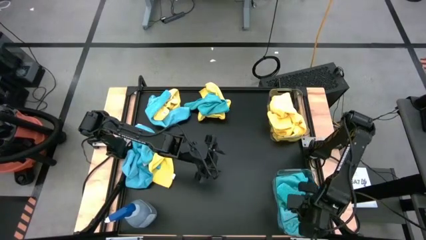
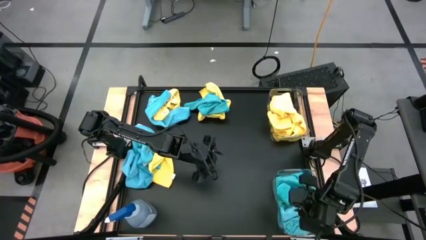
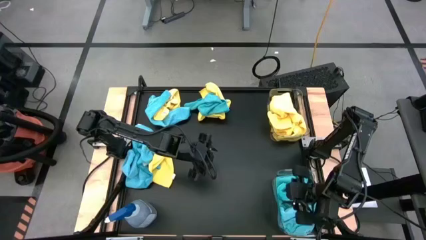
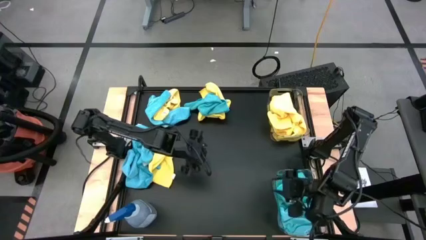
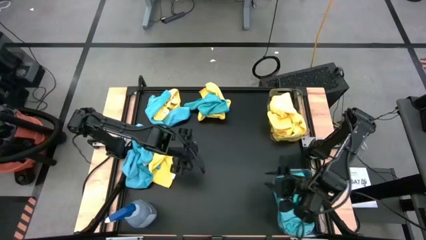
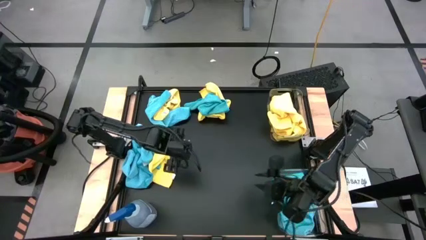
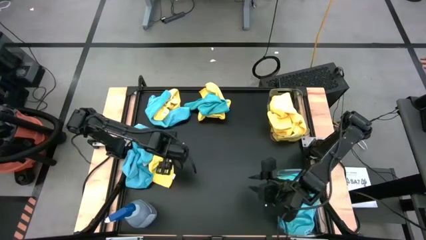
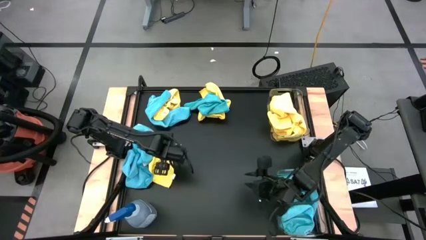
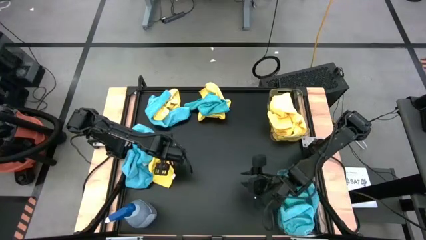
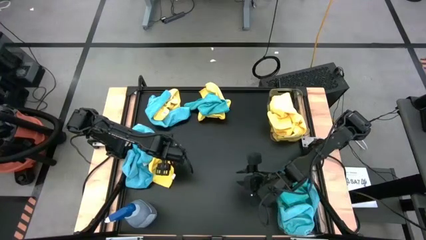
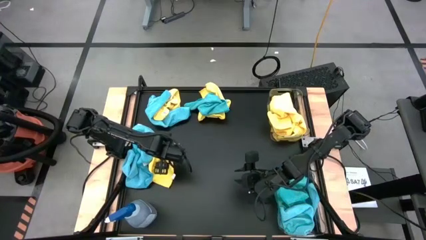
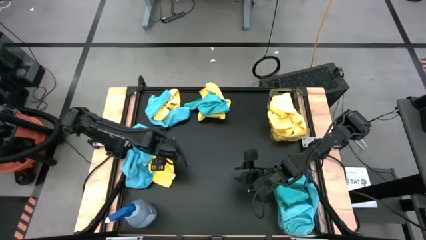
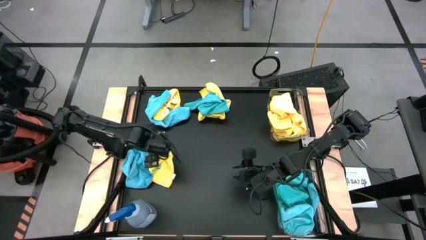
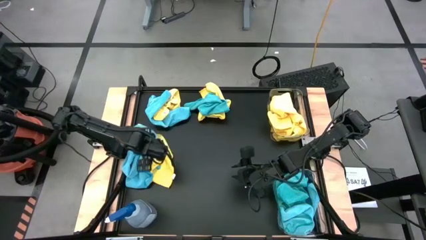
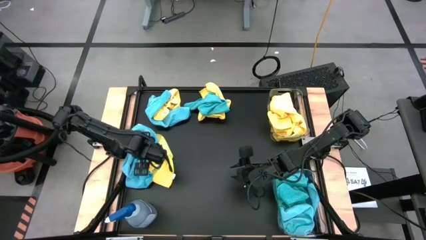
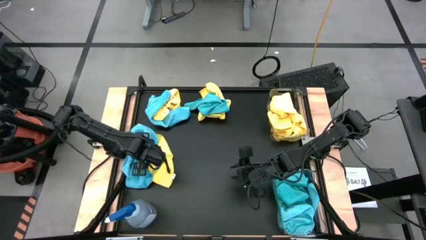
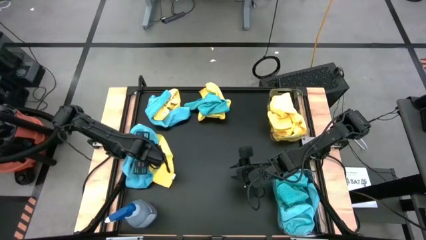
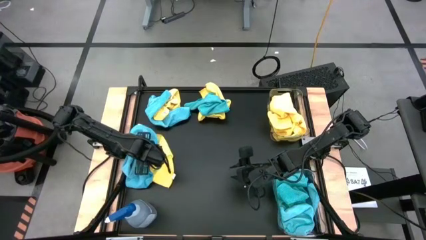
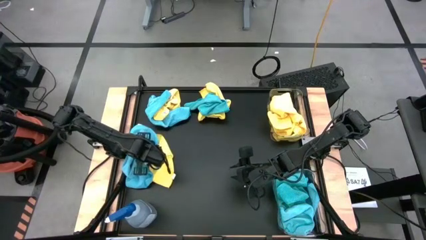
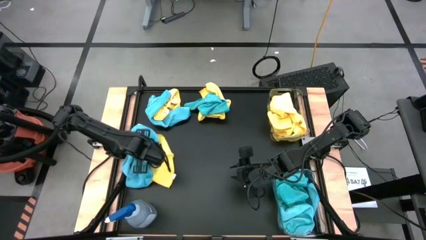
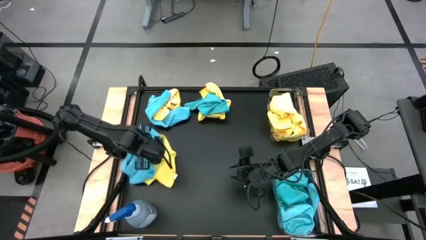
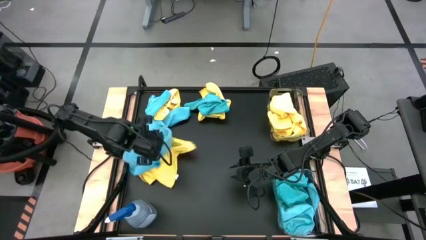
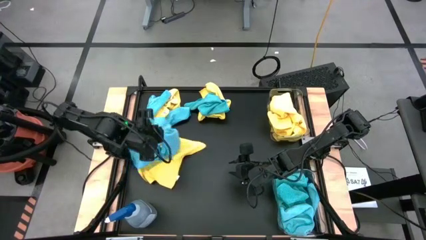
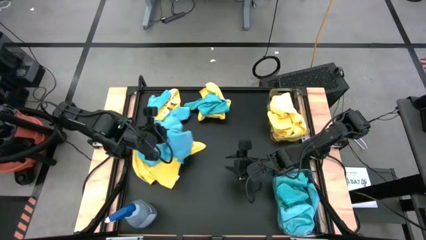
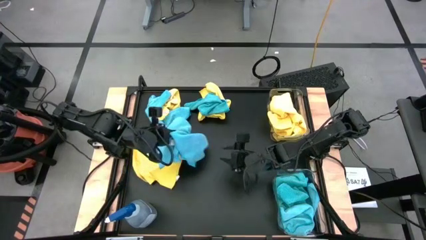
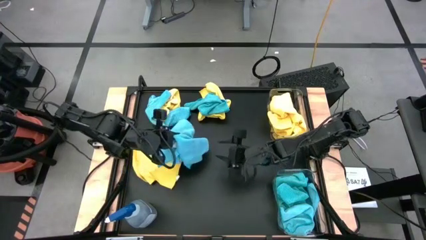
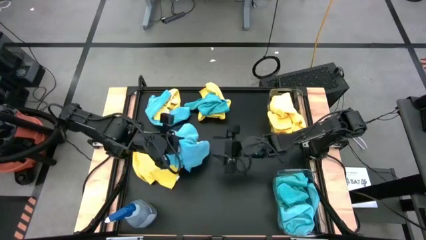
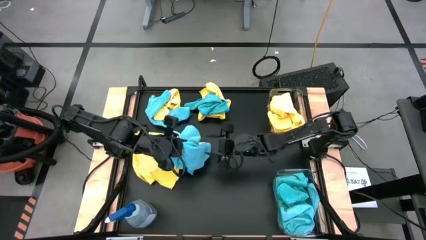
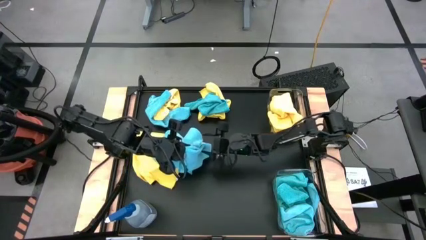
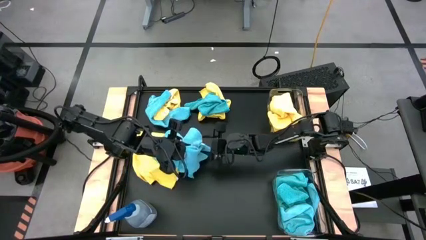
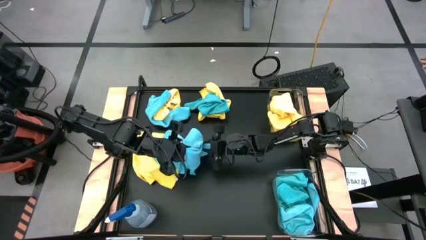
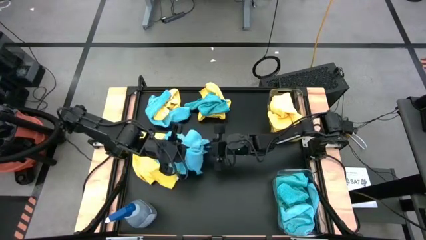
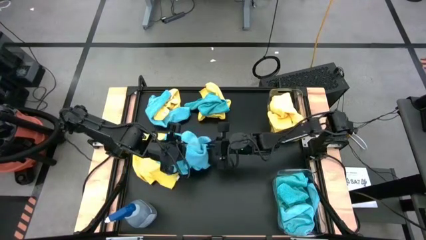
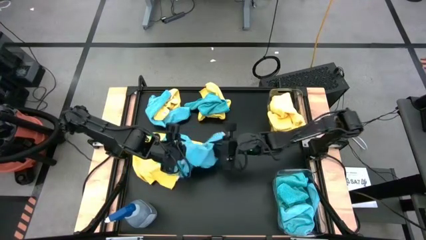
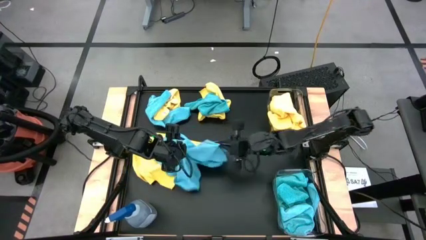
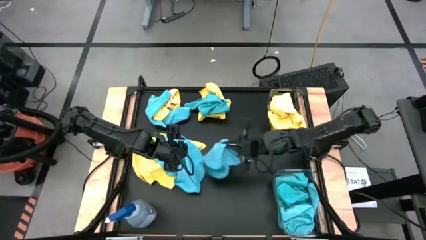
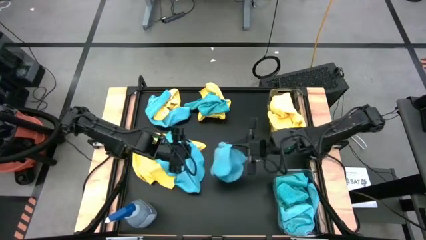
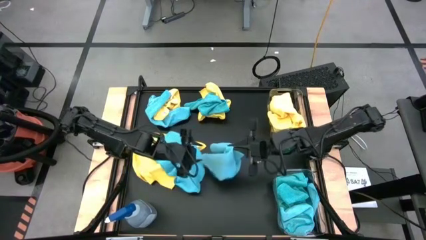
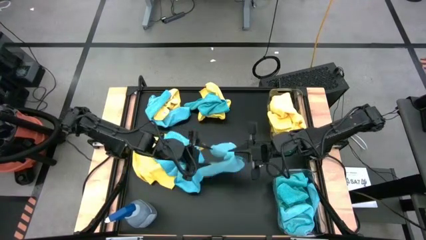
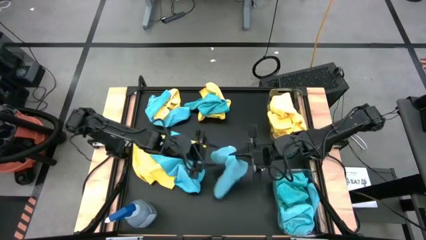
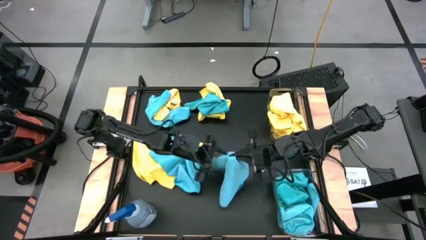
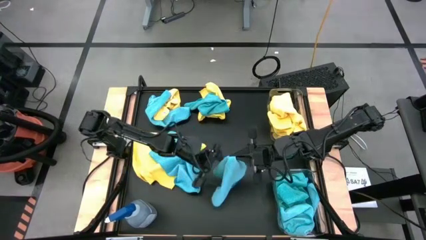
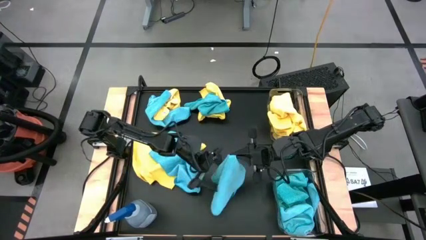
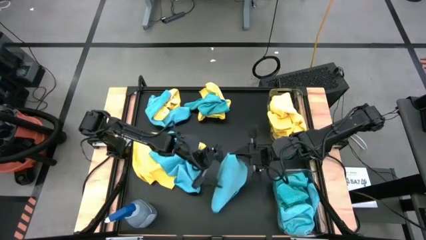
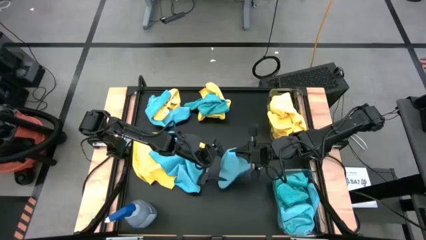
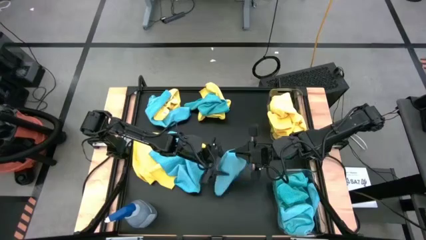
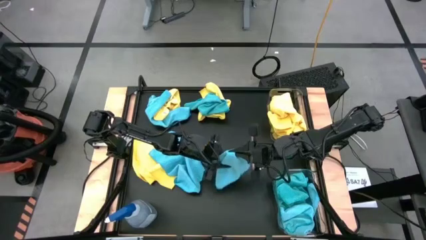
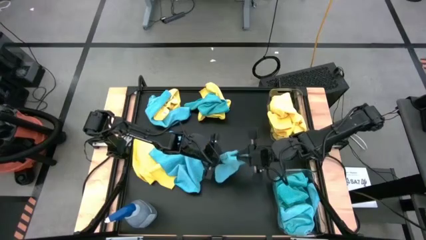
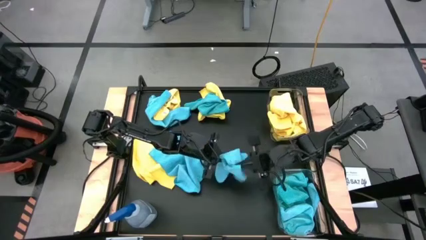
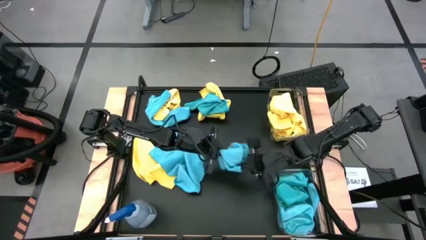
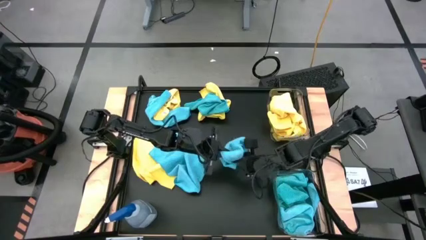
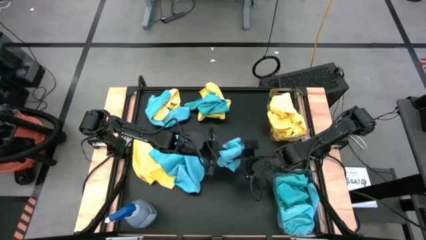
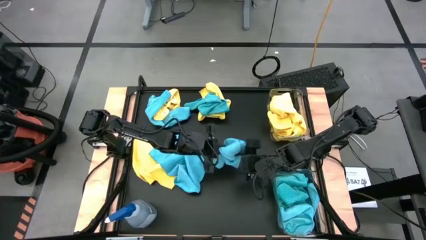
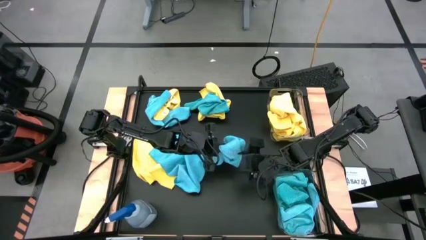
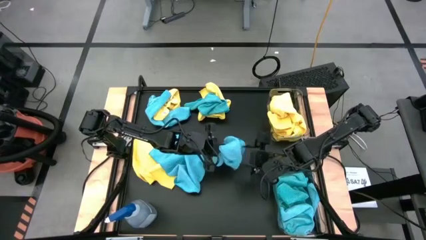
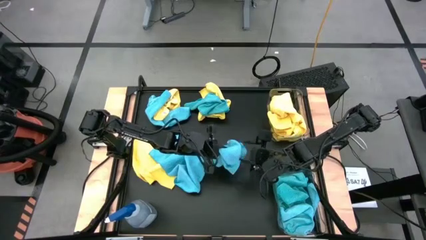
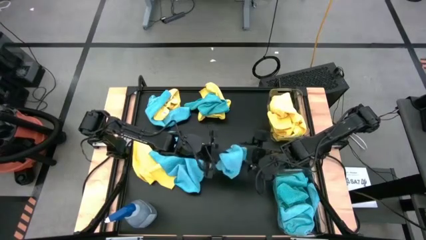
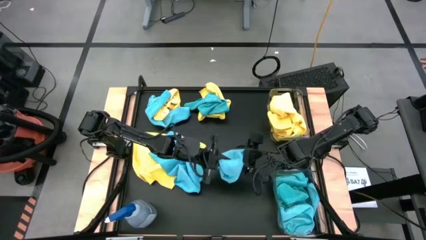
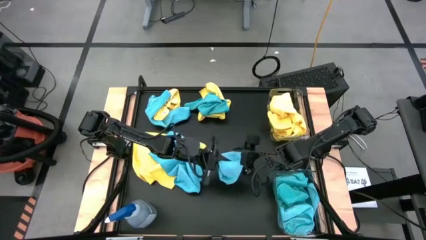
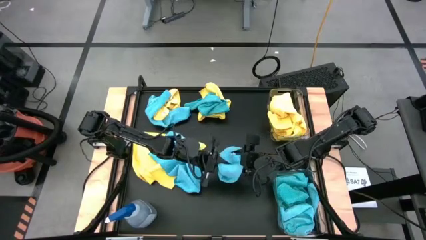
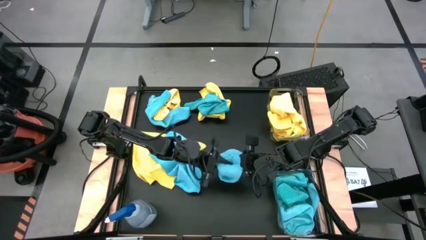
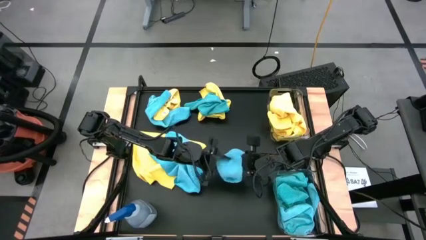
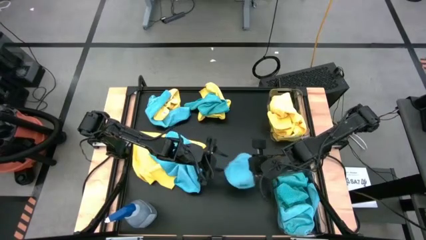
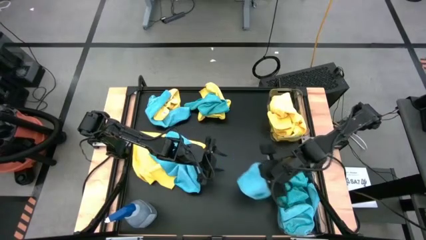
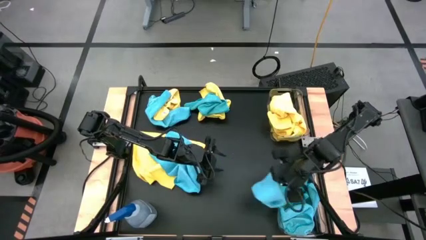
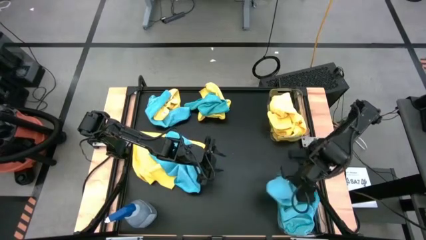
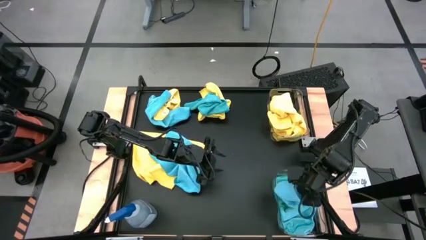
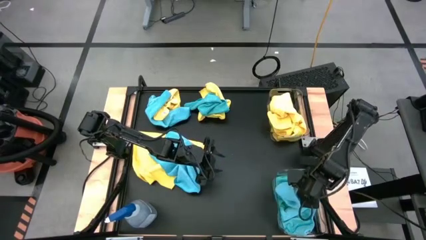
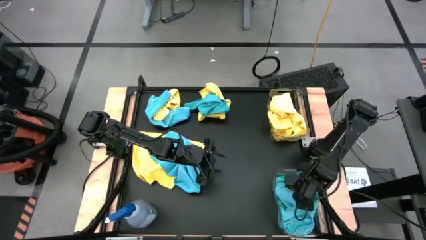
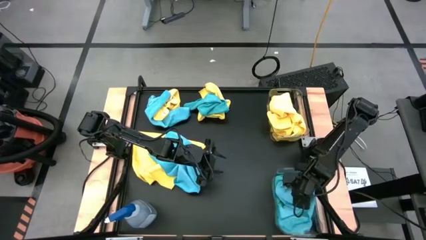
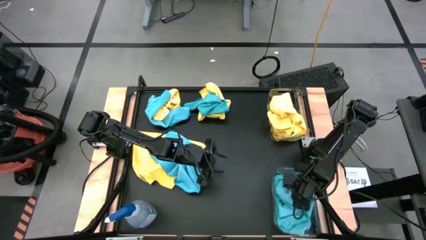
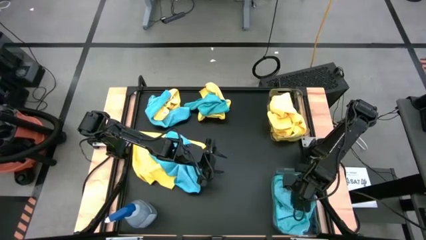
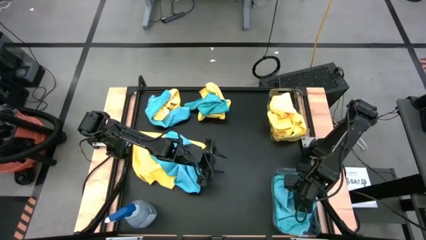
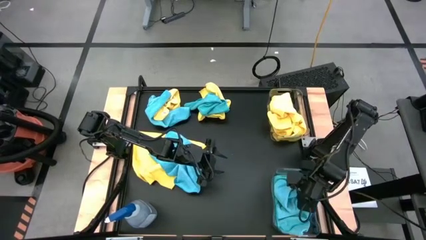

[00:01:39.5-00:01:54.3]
Task: Sort microfiber towel by color & place in baskets
Put the blue towel into the bottom transparent bin

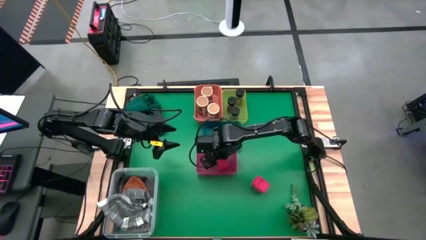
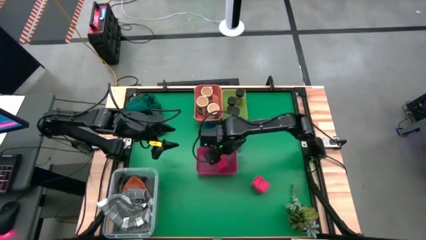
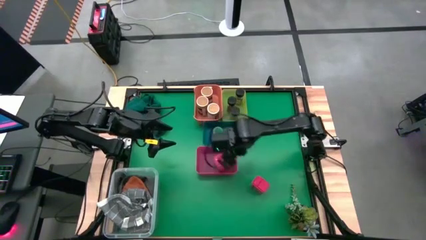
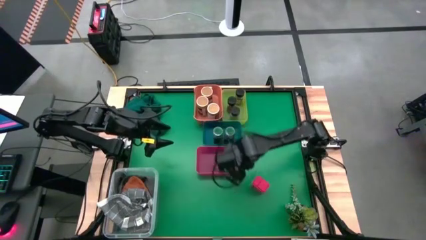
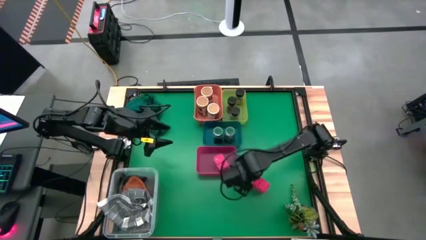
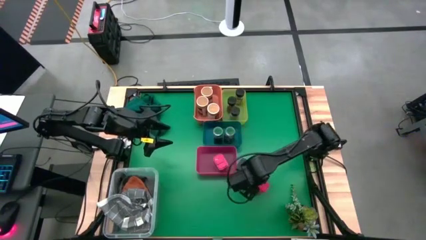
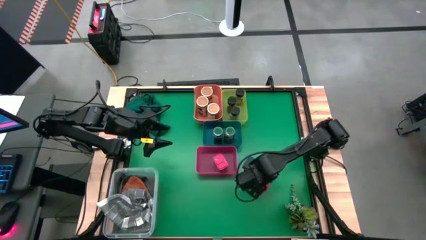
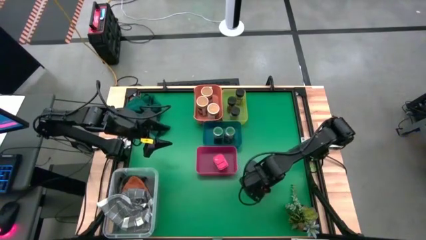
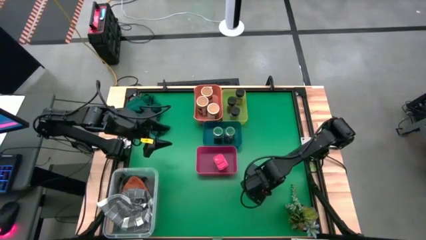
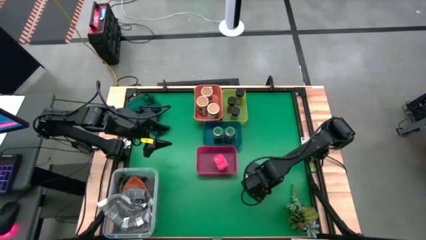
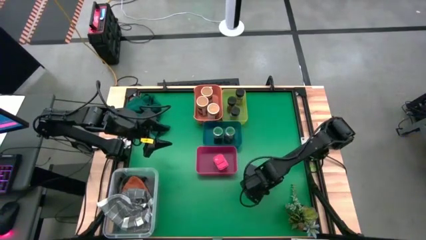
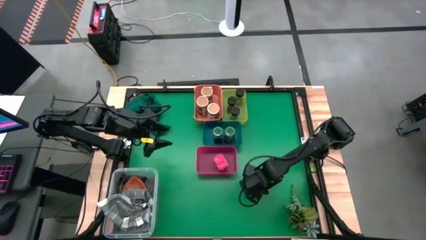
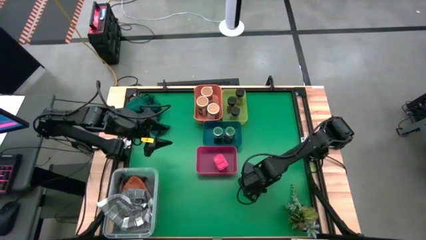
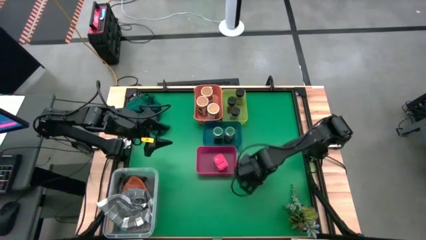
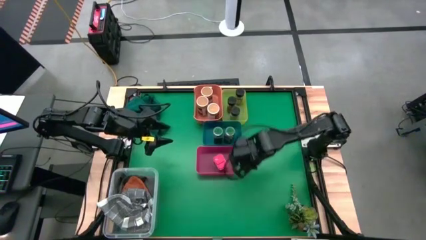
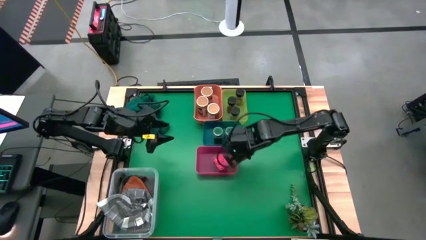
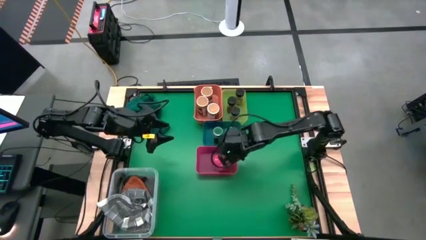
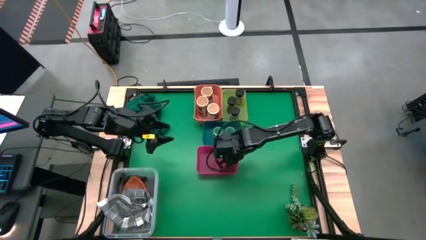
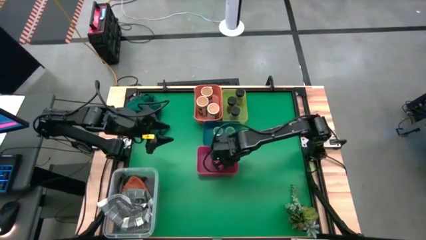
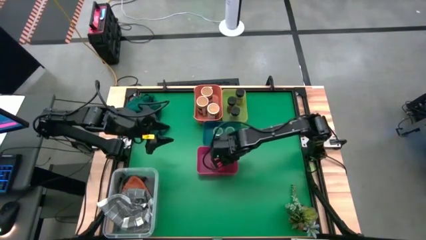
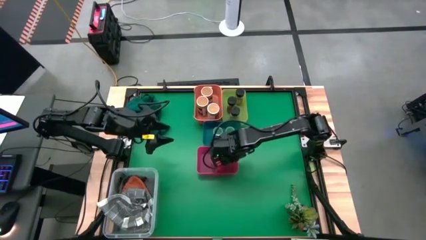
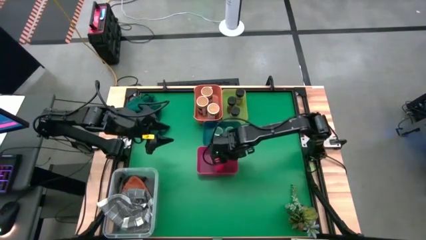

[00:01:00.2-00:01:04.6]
Task: Sort spices by type
Put the red seasoning can into the red bin
